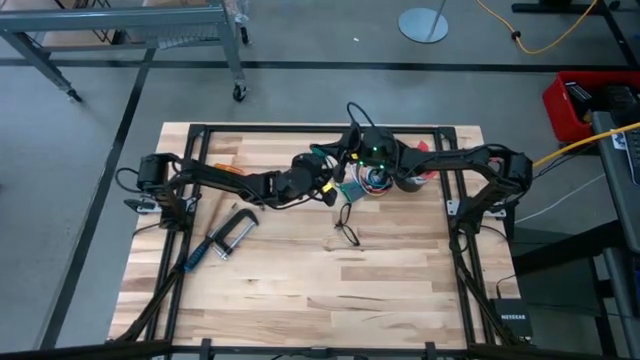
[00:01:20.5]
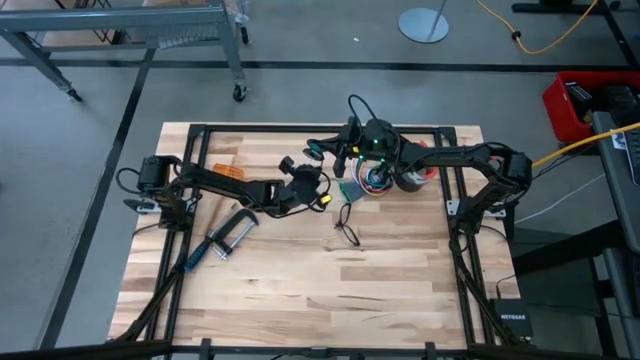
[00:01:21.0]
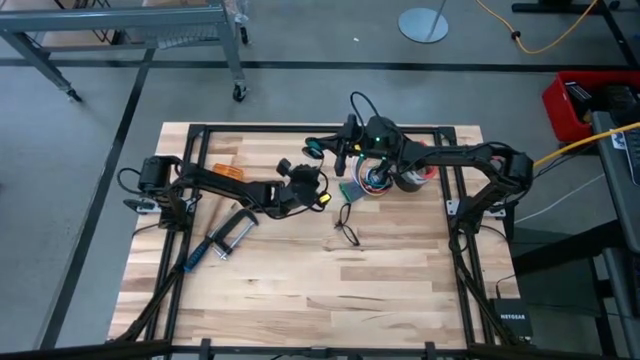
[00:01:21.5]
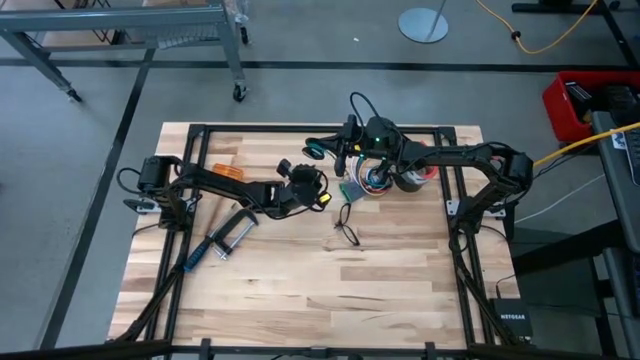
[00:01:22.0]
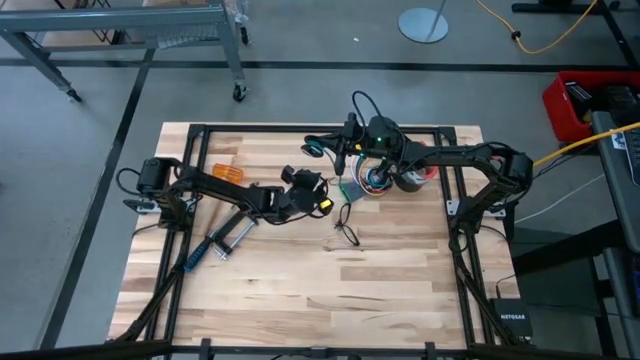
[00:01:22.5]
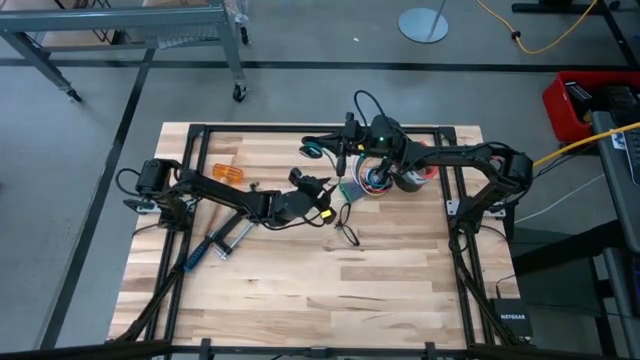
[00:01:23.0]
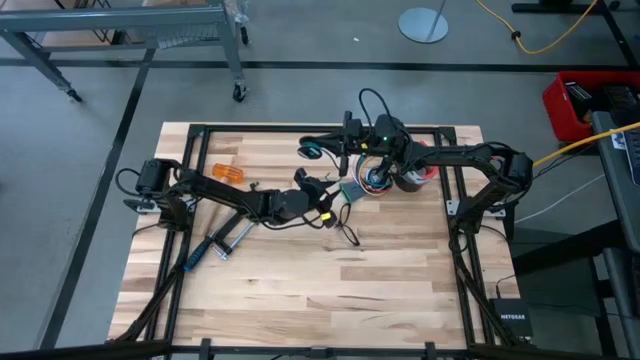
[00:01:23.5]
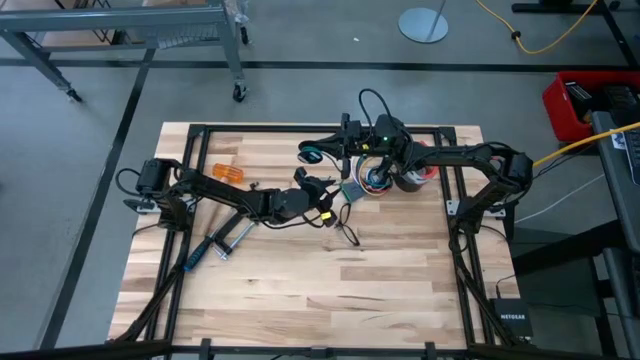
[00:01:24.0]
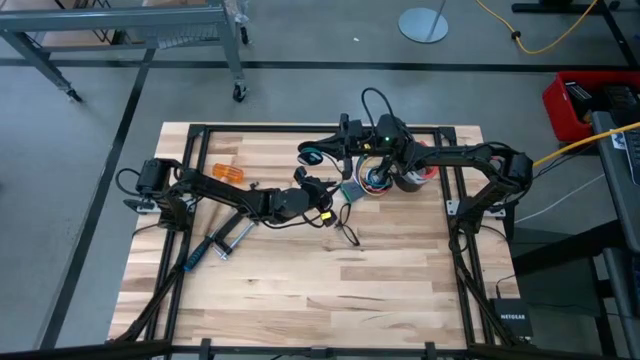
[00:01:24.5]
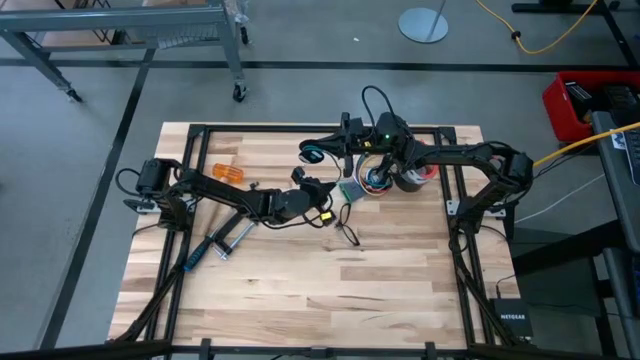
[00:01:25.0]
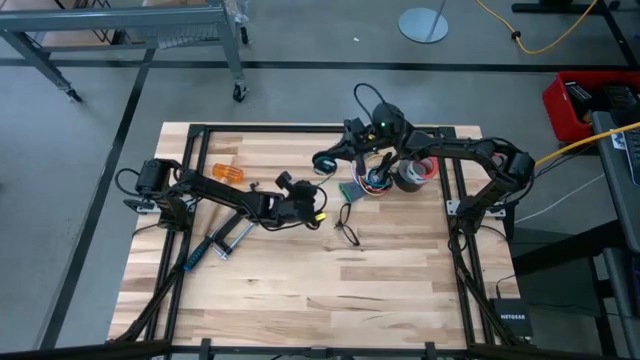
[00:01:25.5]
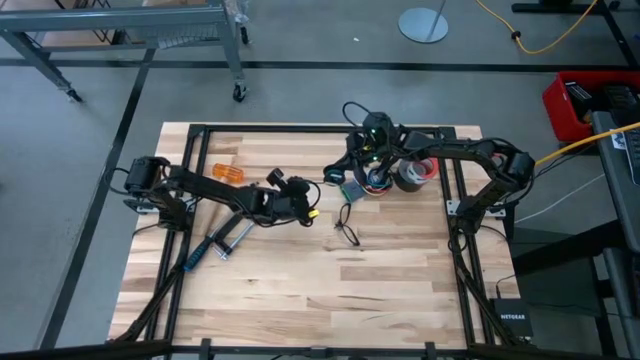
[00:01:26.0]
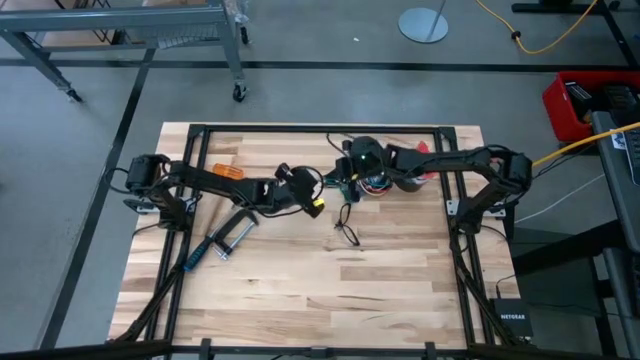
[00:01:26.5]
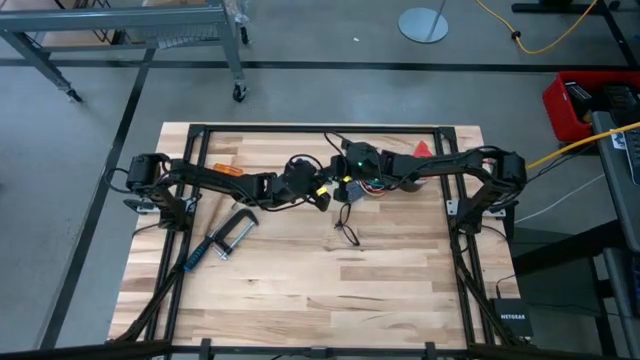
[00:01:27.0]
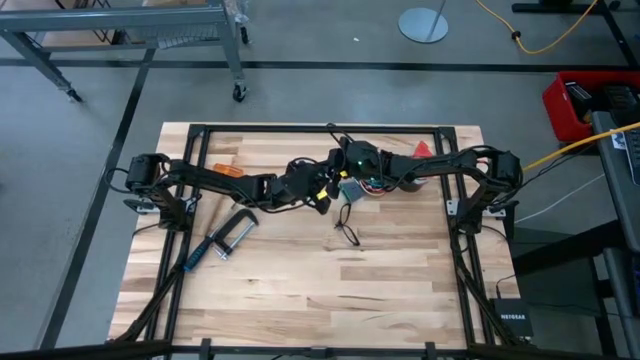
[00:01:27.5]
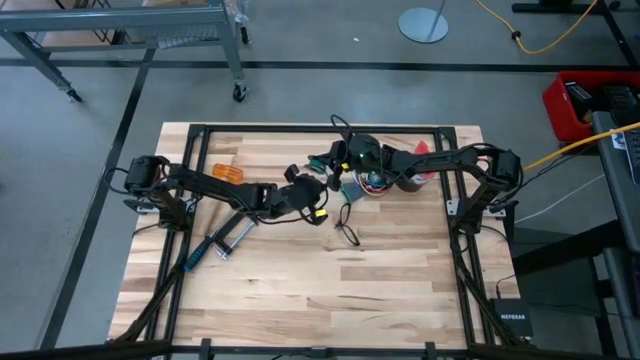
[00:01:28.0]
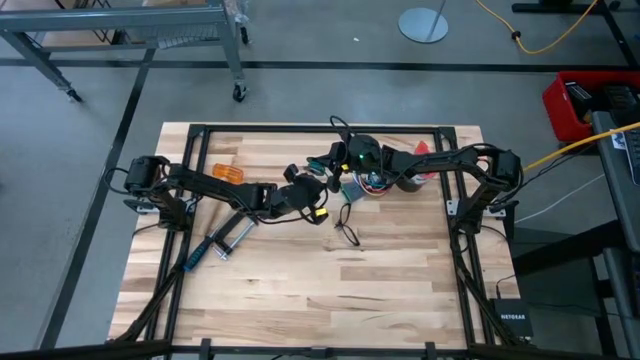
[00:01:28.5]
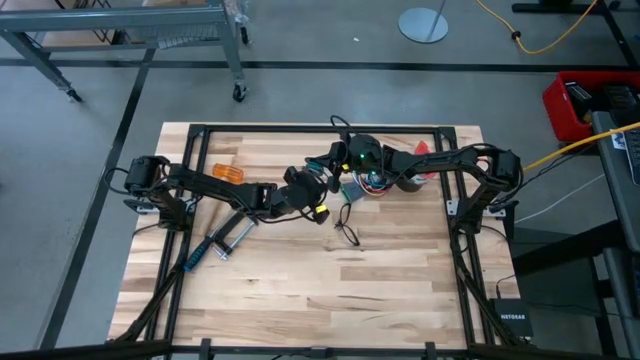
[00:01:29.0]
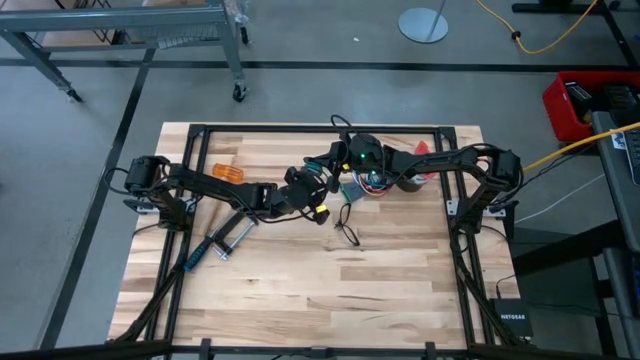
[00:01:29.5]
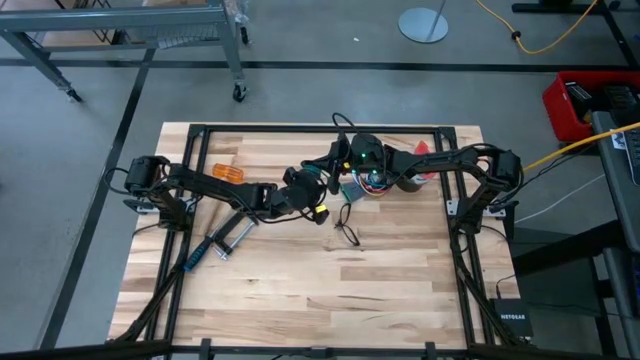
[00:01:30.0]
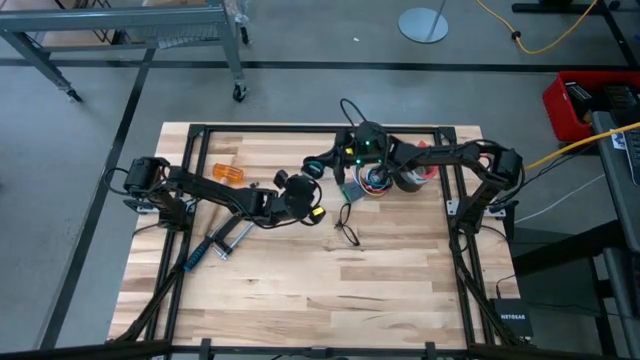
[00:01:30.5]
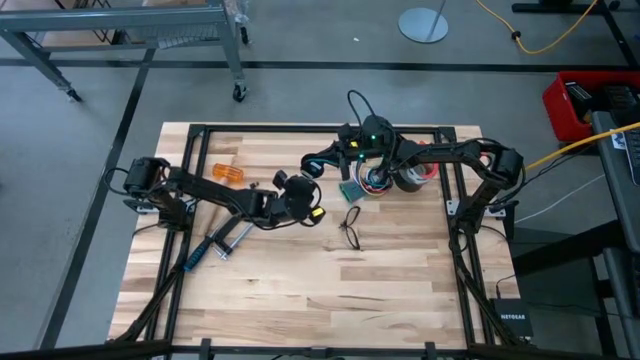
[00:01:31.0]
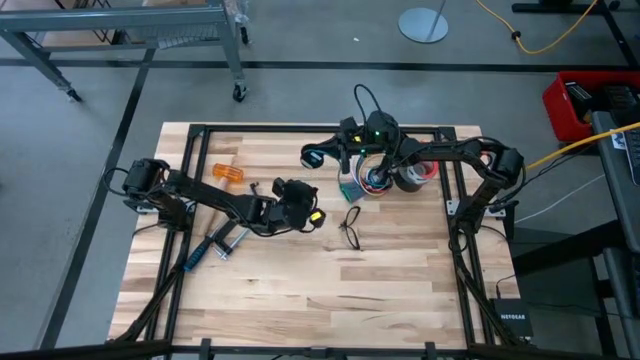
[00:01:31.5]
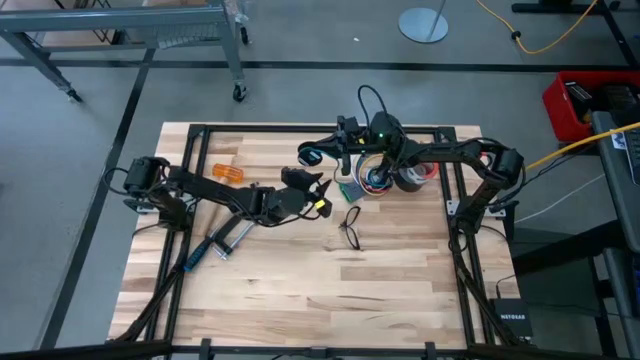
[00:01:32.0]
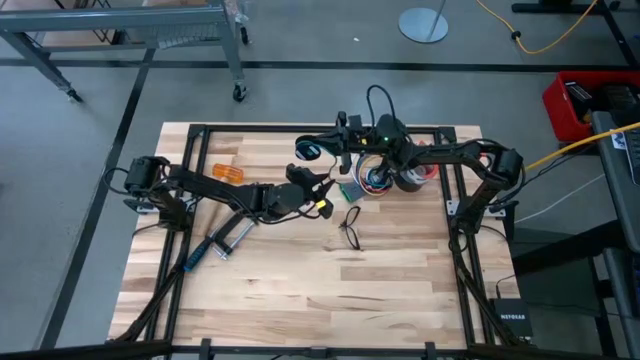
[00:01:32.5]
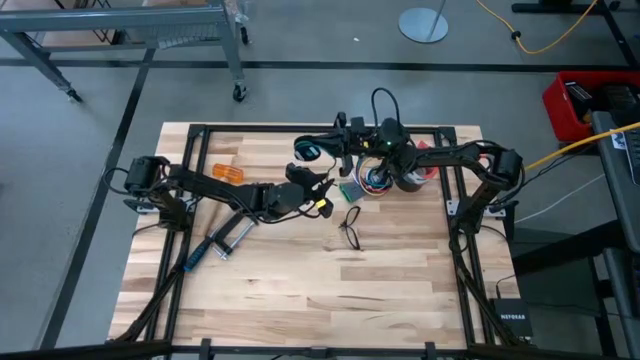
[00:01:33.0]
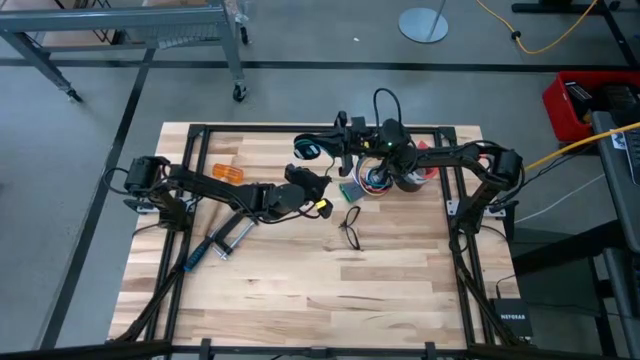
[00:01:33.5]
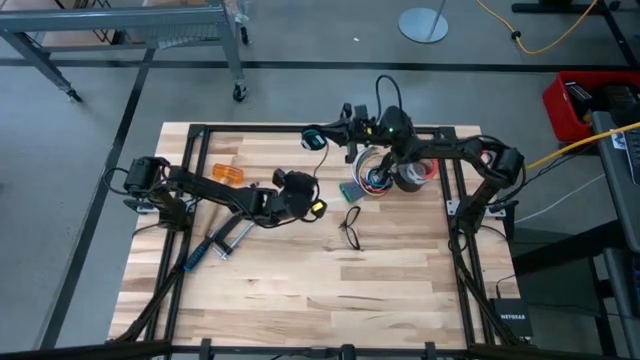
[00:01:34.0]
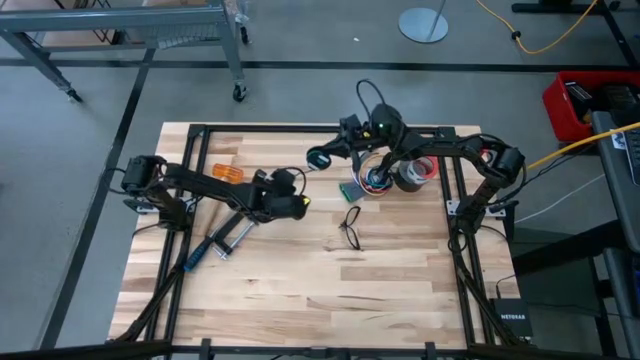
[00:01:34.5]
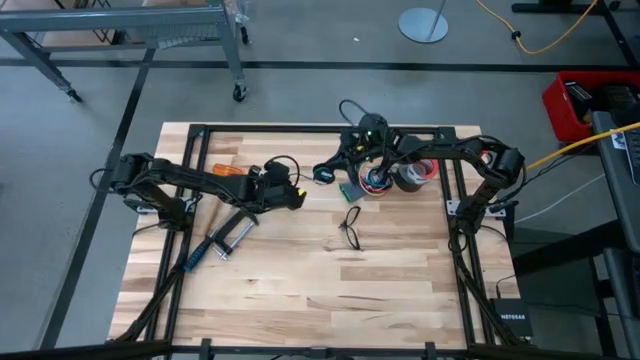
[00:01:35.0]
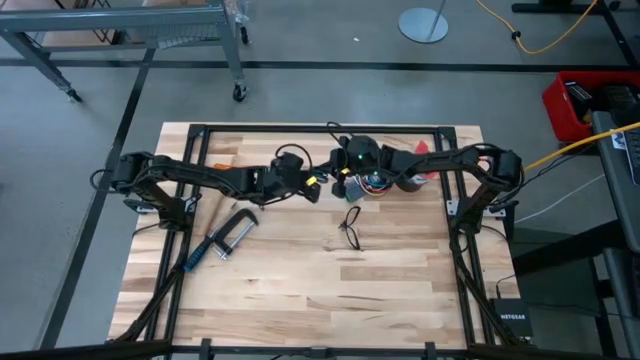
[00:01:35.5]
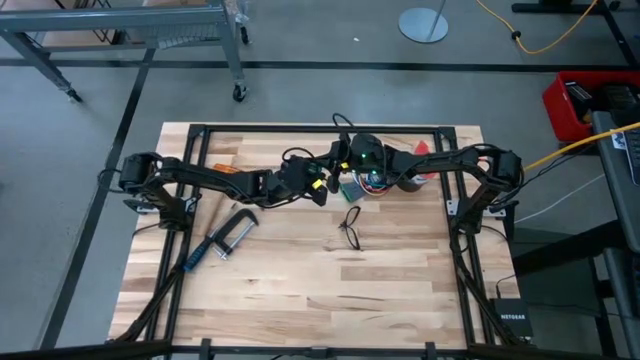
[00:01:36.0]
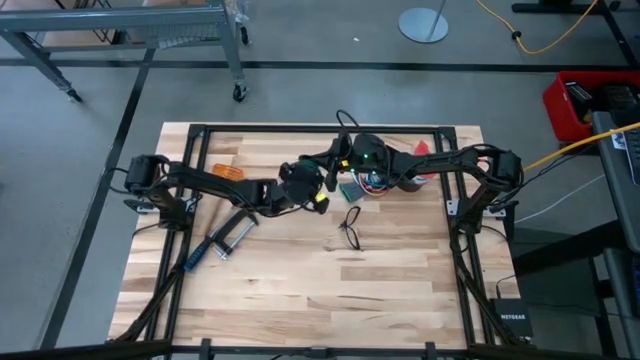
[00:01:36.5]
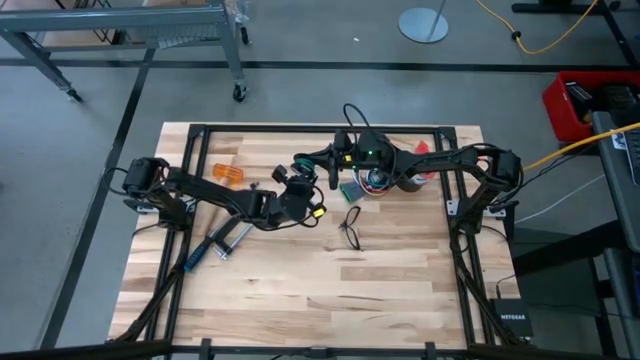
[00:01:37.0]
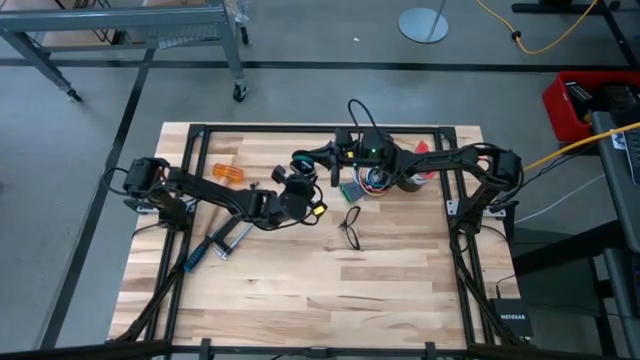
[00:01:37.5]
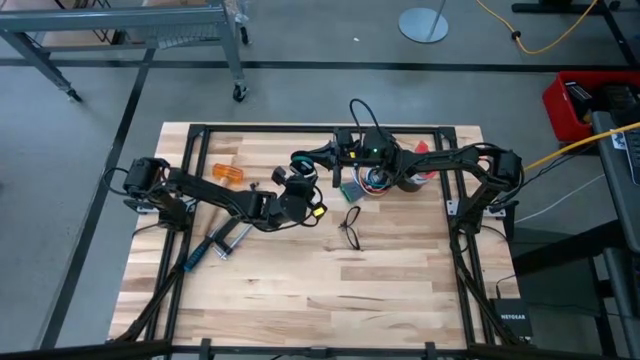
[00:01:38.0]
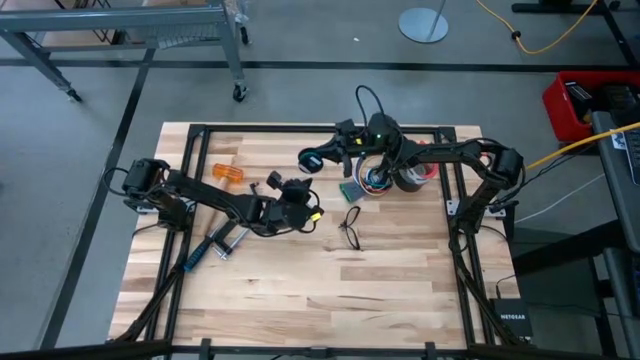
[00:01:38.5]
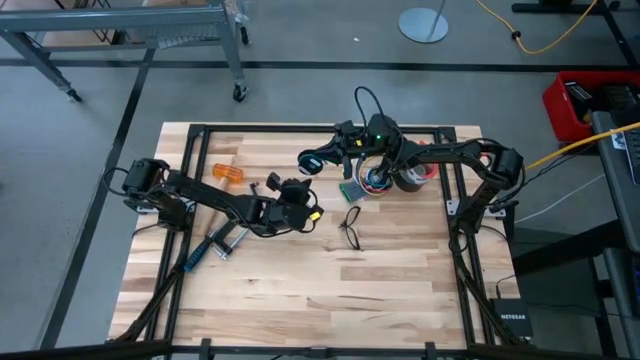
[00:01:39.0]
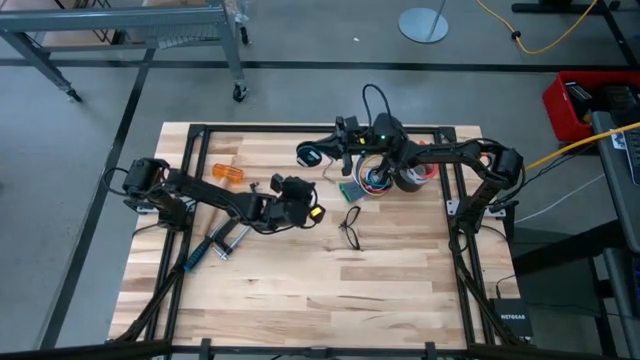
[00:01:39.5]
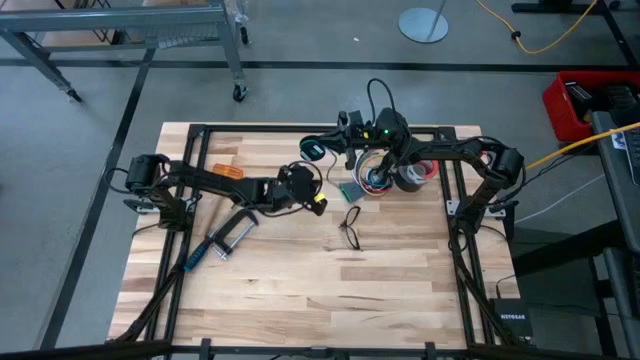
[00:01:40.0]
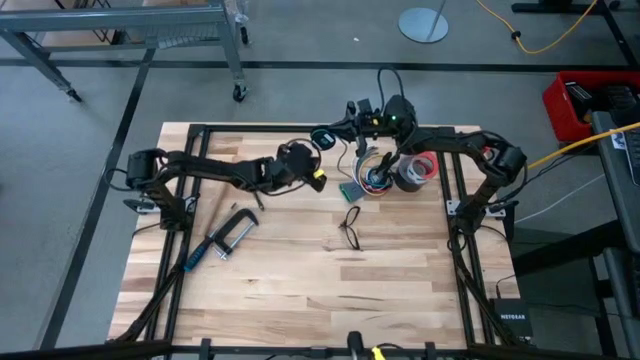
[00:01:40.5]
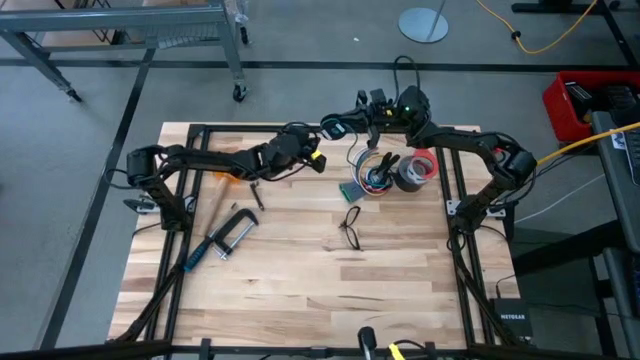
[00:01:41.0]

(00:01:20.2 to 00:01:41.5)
Task: Coil cords
Coil the green wire on the black spool
